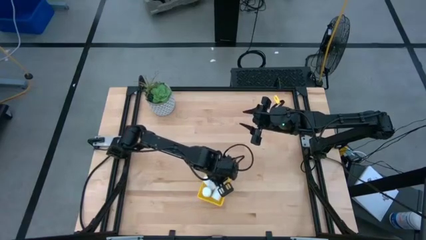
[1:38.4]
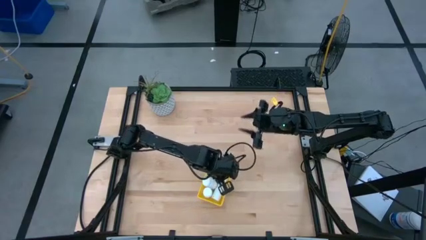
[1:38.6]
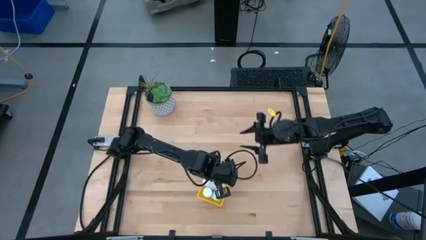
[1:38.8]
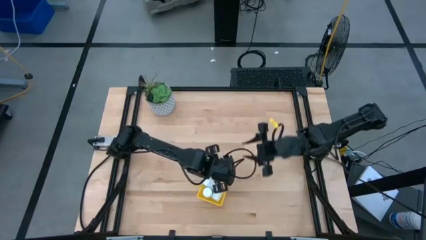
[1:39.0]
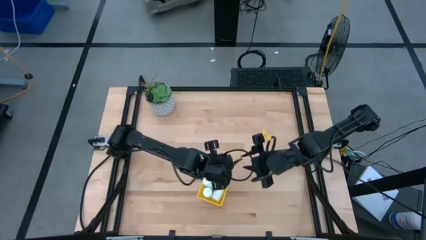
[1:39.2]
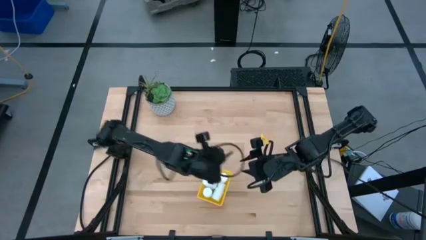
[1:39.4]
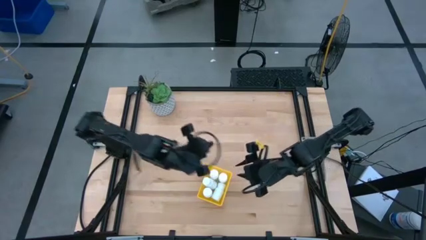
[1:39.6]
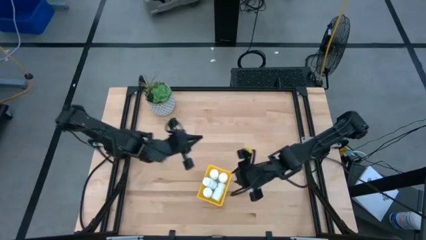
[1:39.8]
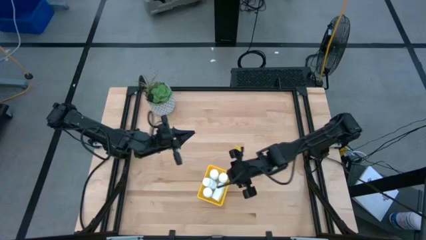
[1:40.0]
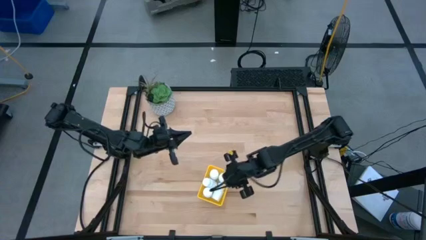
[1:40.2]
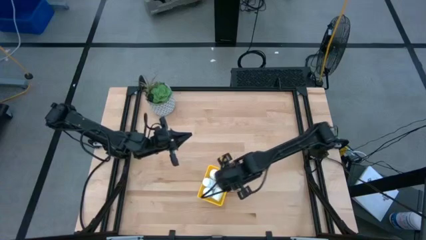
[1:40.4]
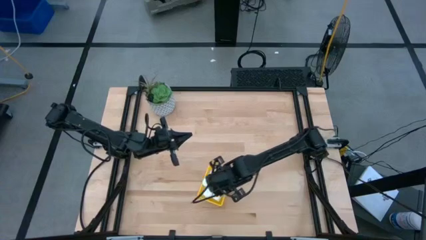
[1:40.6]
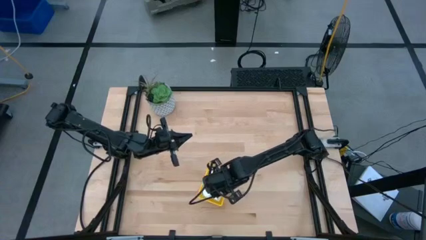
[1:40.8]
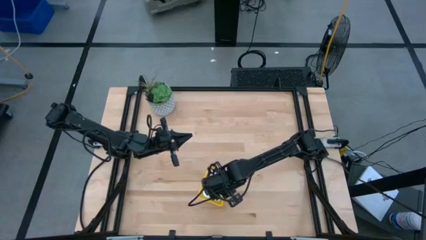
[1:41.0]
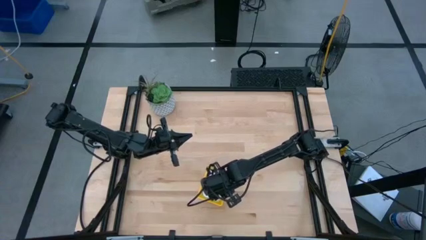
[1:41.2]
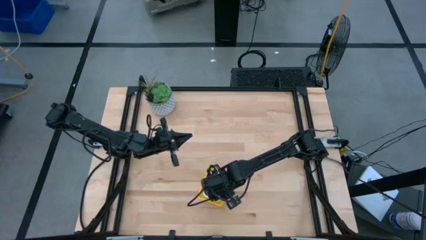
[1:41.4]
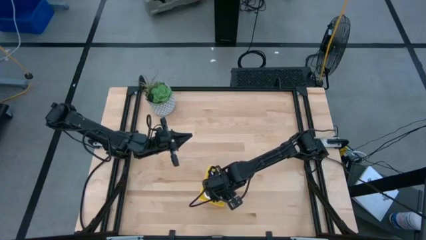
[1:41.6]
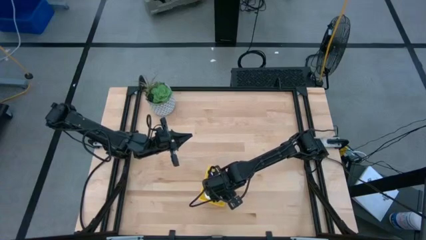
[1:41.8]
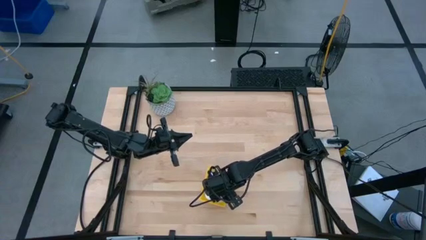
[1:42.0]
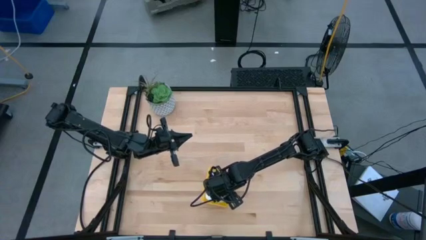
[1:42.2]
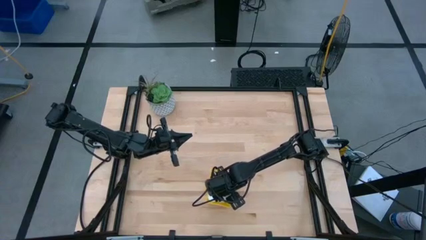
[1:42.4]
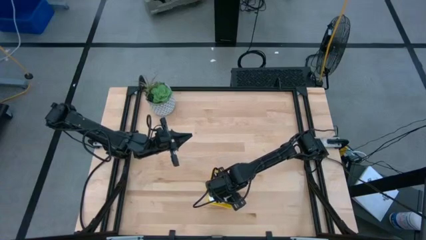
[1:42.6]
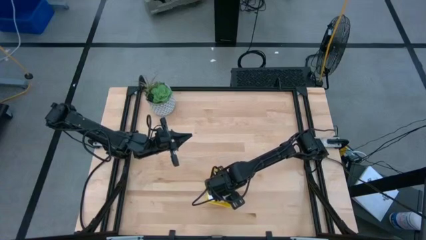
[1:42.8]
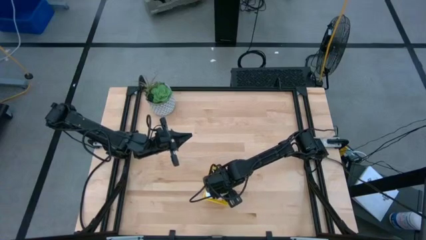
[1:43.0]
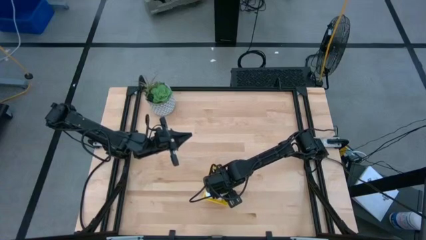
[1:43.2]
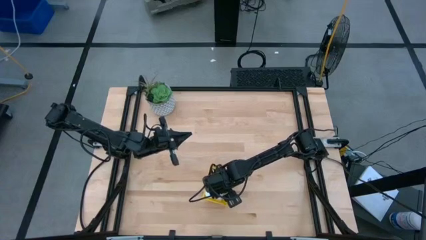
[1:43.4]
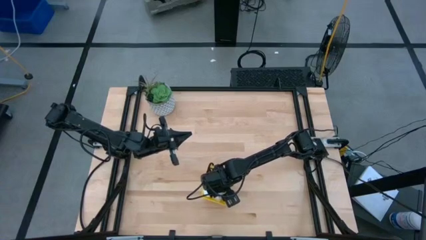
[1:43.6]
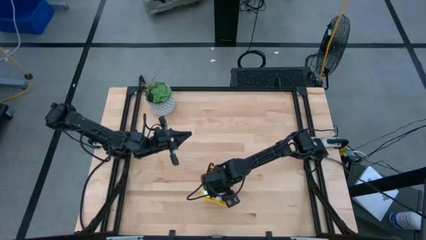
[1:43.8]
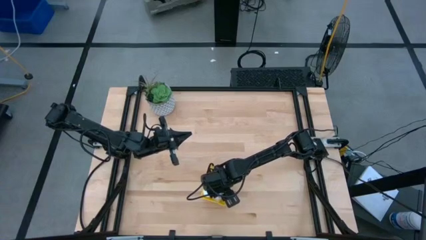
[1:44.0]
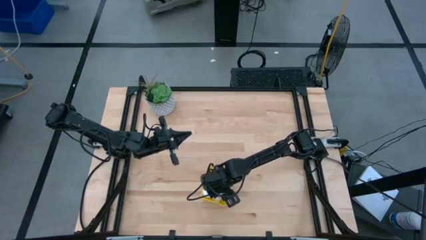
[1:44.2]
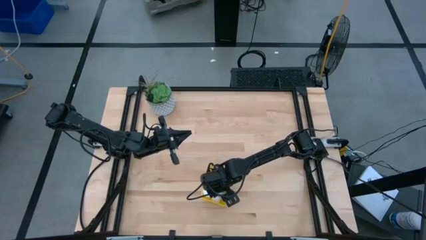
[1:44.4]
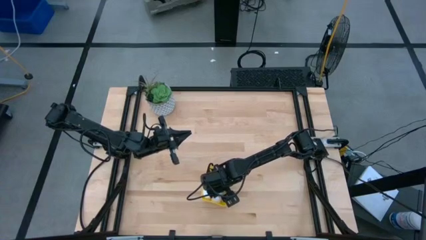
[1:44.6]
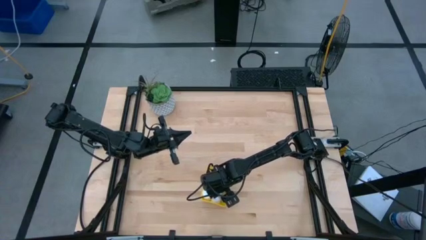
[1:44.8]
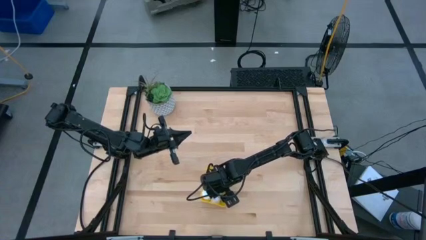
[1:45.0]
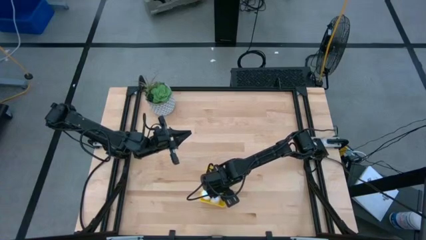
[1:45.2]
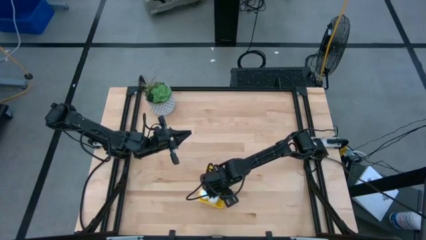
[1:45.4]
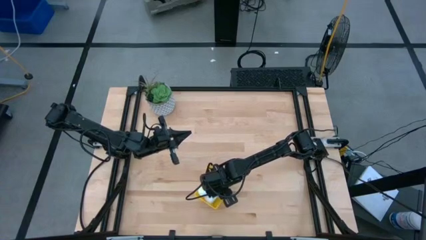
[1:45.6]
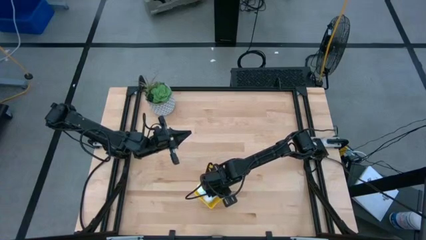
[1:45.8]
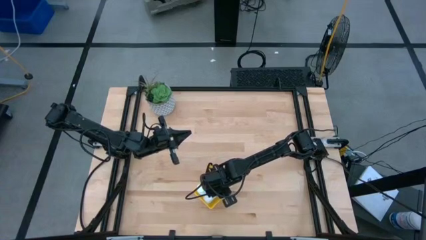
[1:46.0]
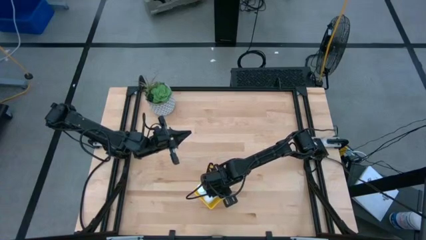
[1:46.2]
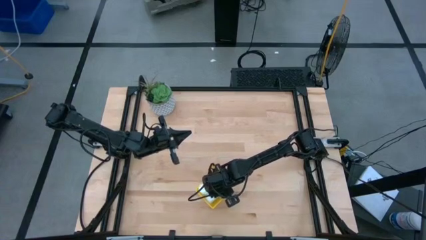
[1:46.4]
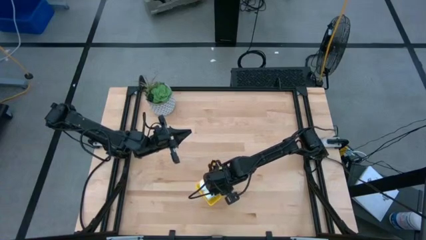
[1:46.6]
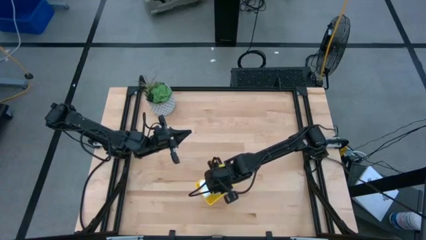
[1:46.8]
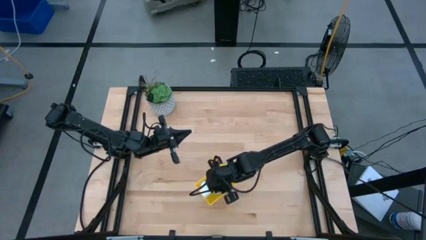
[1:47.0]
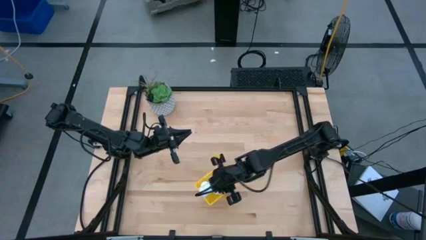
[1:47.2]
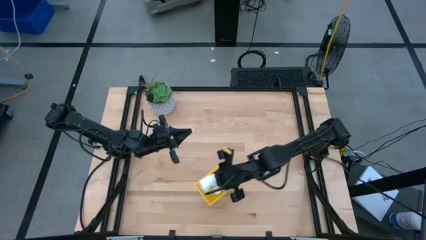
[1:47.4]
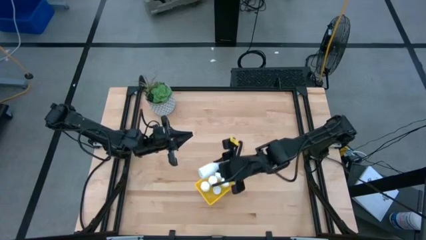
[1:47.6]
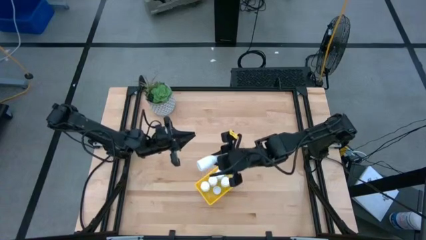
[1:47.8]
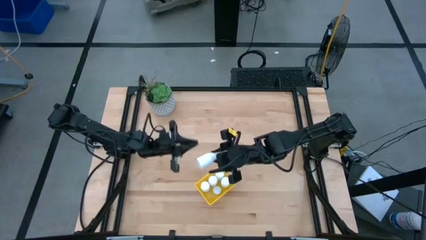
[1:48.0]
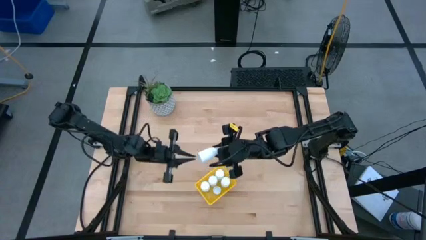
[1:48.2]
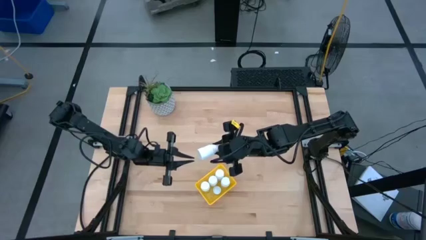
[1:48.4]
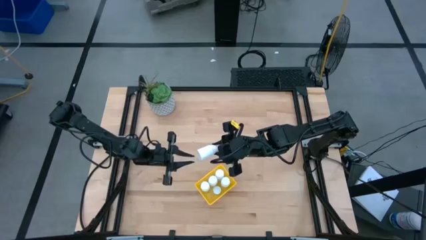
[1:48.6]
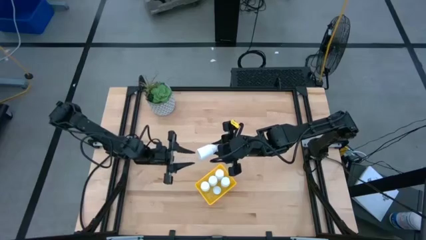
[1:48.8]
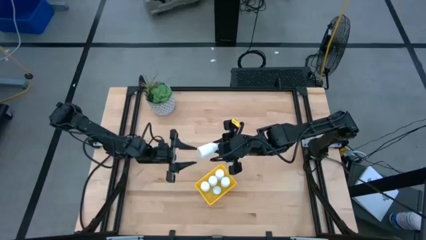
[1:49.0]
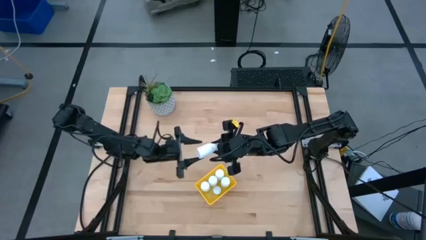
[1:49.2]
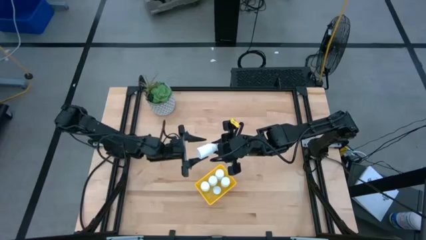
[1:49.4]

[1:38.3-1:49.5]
Task: Pick and place pill bottles into a basket
Adjust the white medicine bottle in the yellow bin

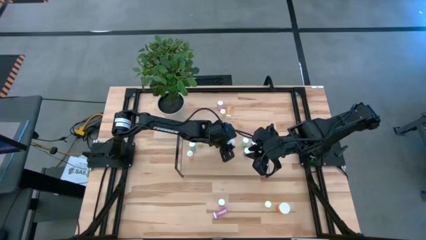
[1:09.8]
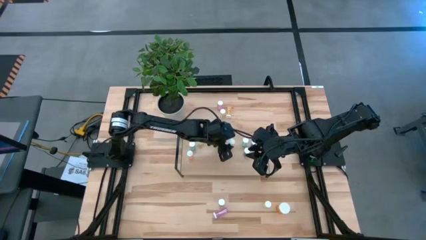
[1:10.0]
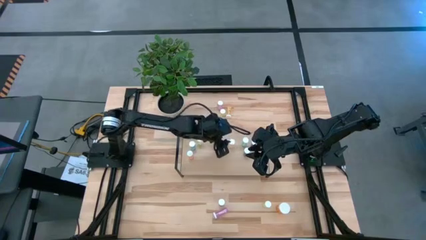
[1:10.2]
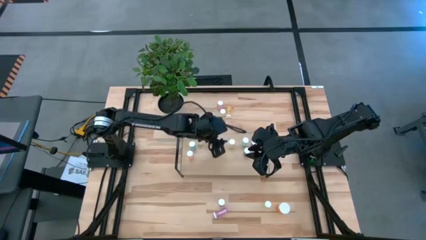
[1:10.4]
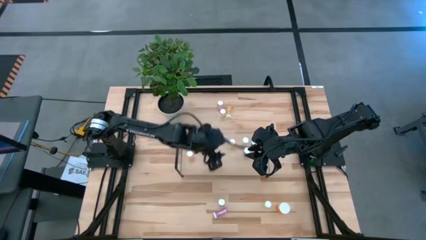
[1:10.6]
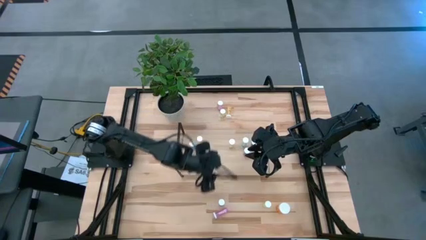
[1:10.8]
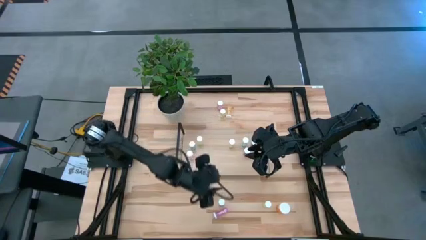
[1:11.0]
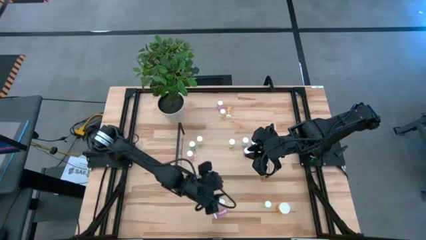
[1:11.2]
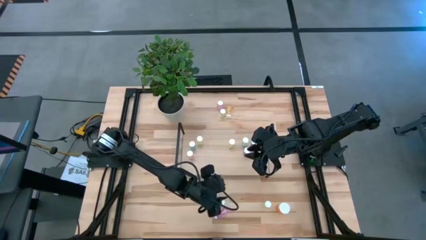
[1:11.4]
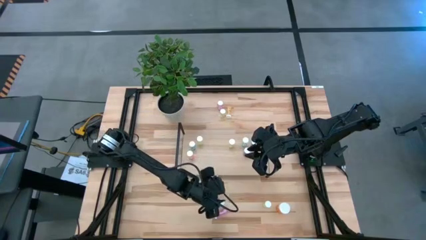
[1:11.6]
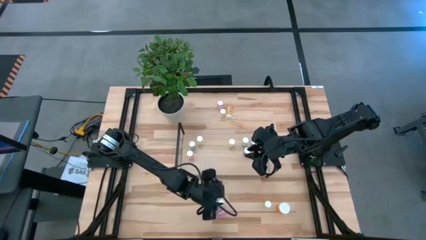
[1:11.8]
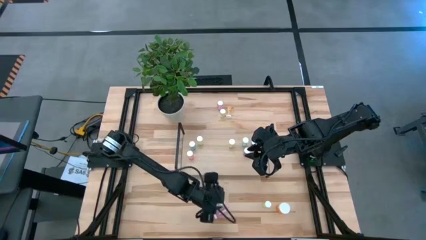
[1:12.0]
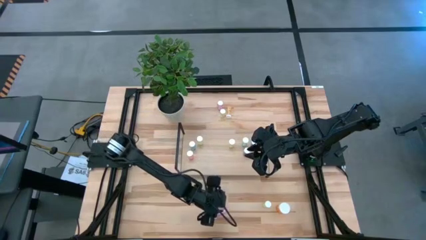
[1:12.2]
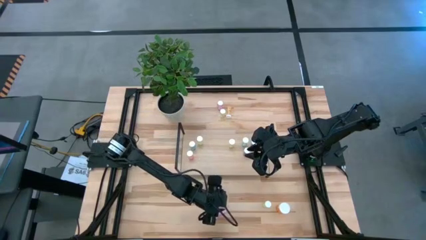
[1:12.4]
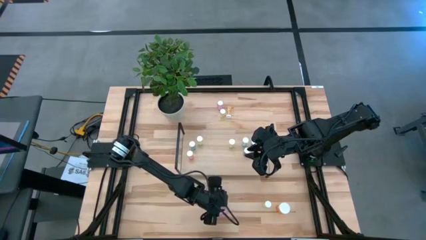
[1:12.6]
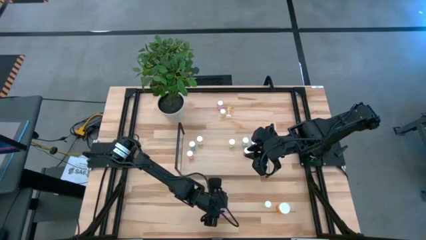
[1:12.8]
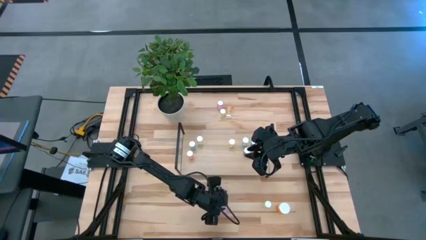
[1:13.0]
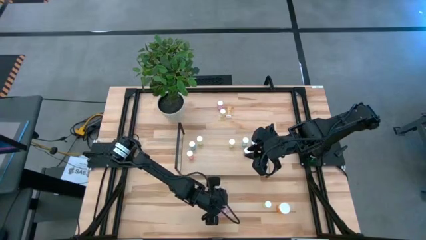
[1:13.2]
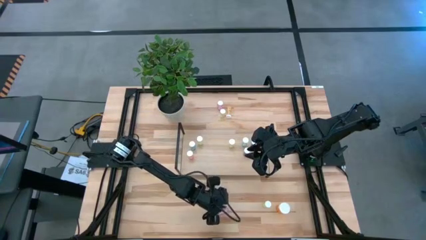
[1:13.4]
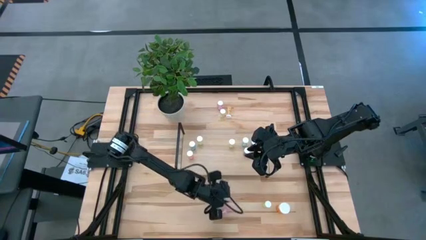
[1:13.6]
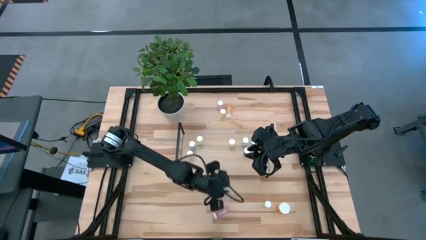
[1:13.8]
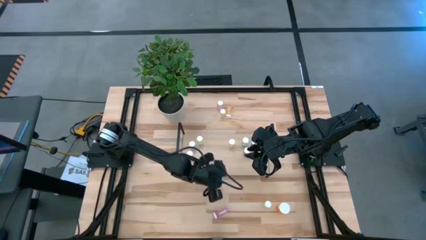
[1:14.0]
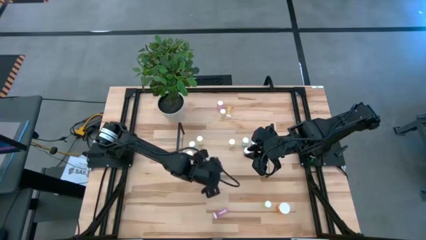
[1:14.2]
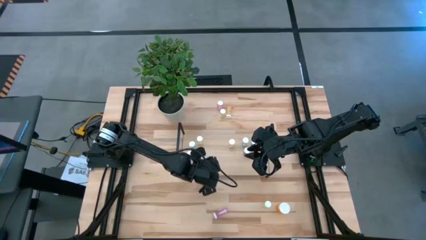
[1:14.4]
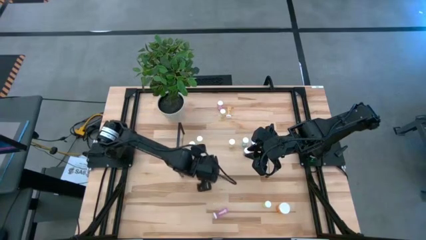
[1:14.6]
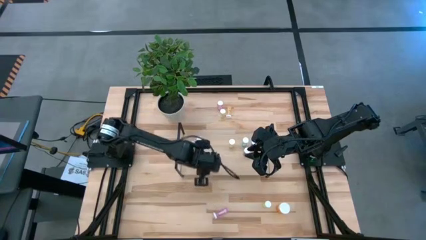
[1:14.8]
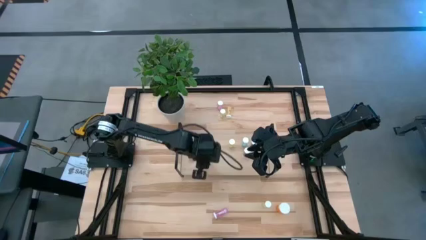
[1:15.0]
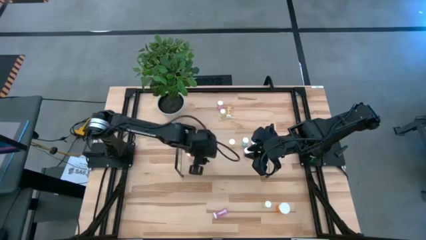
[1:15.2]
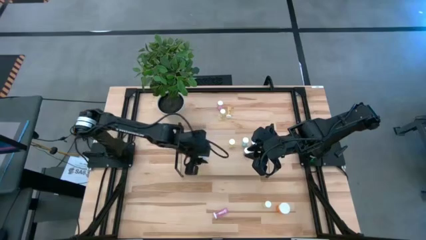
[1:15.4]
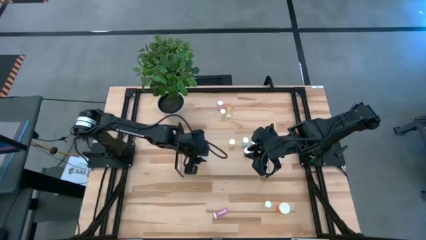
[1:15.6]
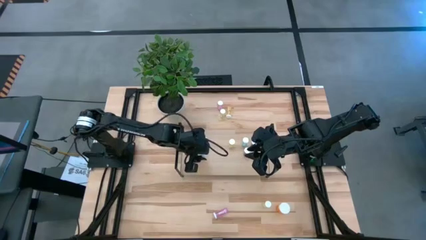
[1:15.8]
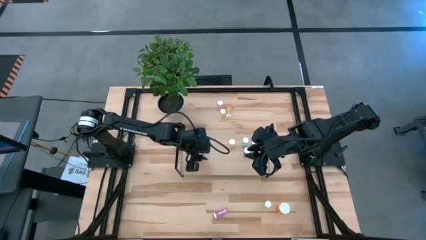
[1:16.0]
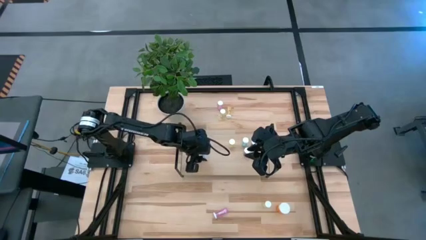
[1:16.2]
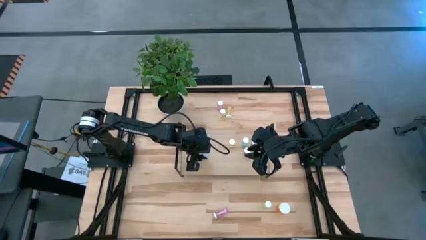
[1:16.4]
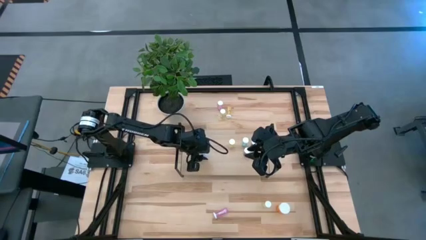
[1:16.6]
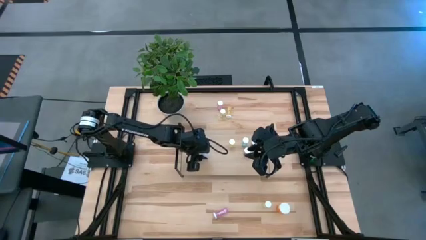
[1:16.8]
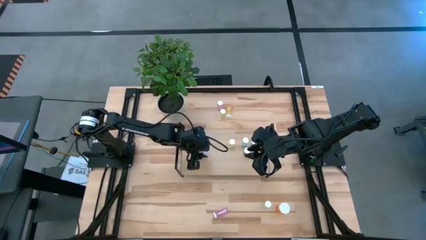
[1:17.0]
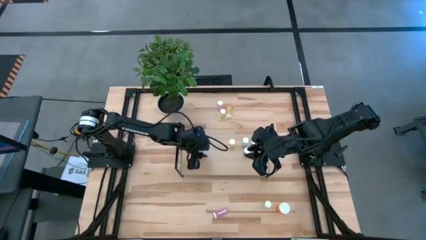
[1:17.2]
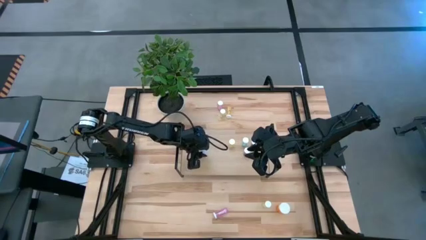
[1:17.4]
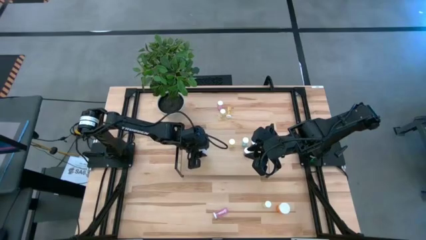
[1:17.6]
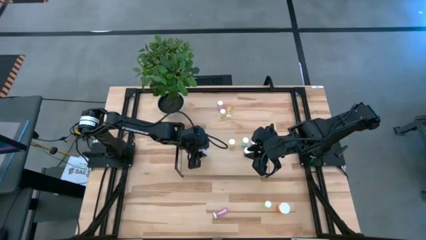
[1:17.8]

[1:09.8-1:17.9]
Task: Pick and place medicine bottles onto shelf by color
Put the blue pill bottle on the shelf
